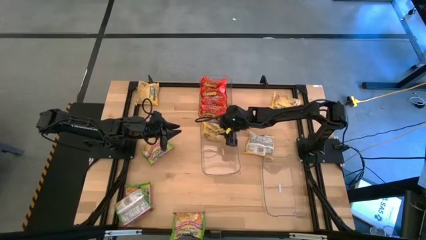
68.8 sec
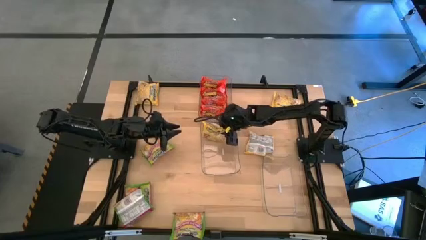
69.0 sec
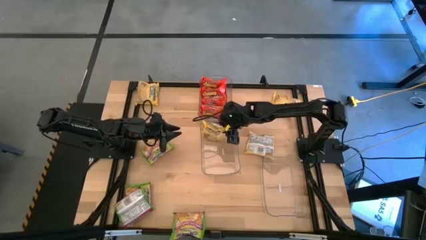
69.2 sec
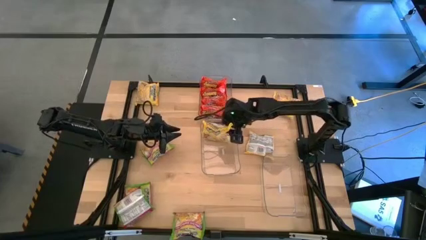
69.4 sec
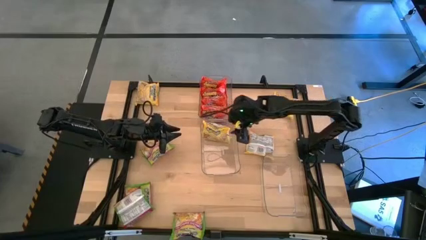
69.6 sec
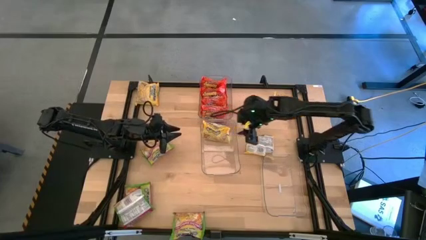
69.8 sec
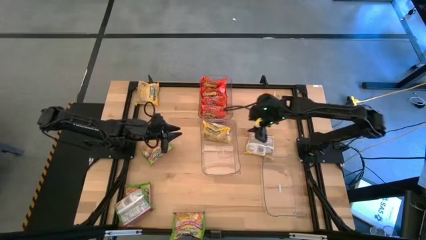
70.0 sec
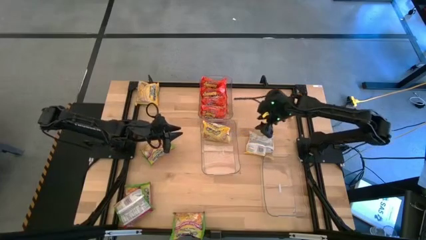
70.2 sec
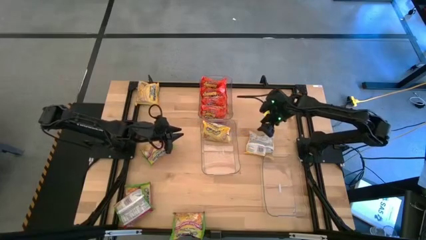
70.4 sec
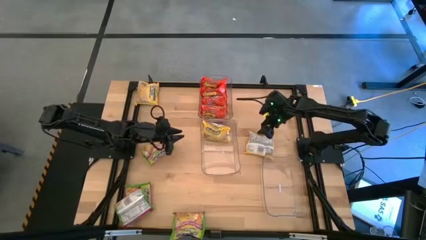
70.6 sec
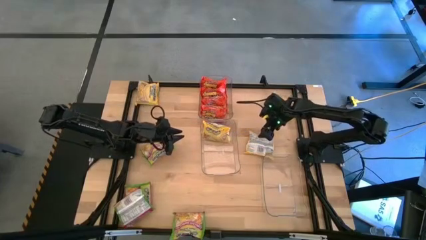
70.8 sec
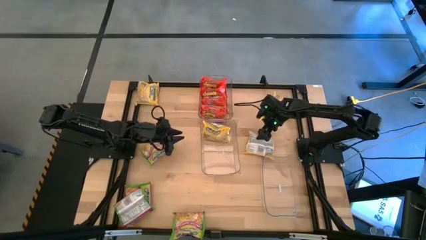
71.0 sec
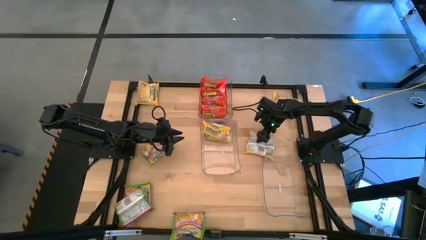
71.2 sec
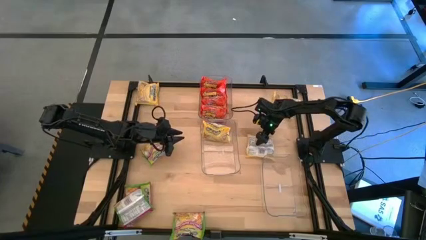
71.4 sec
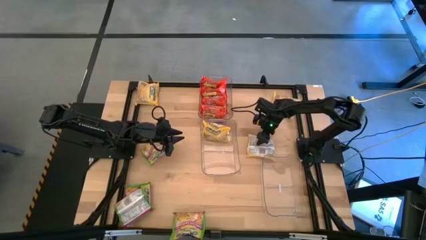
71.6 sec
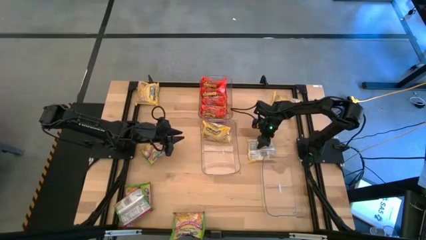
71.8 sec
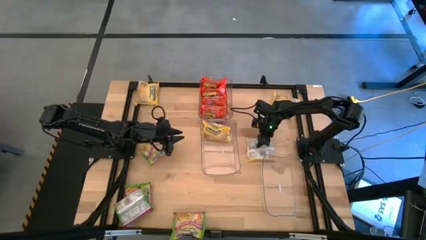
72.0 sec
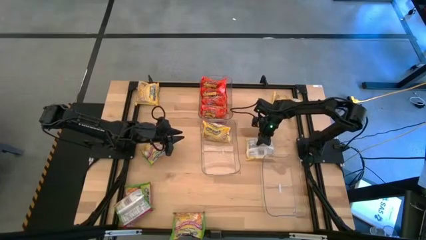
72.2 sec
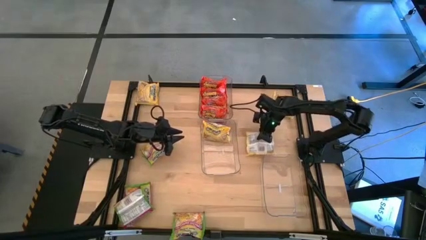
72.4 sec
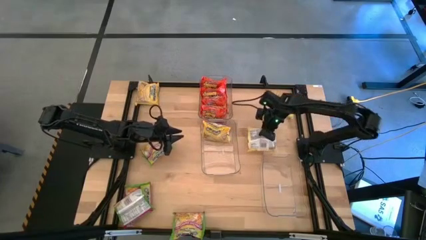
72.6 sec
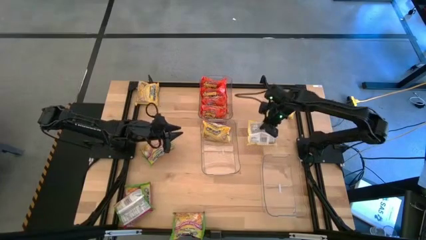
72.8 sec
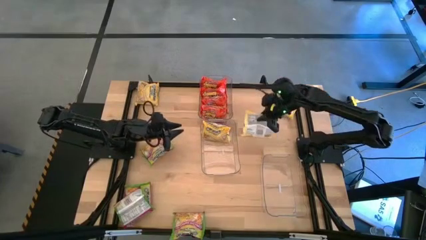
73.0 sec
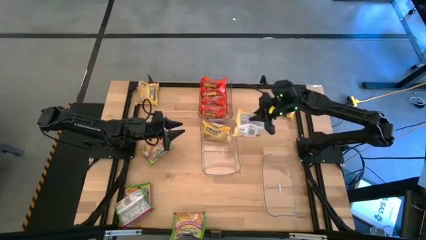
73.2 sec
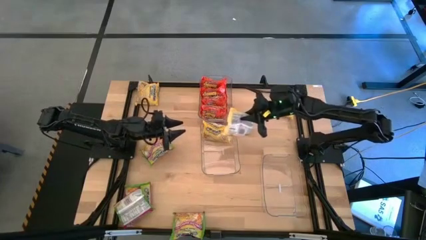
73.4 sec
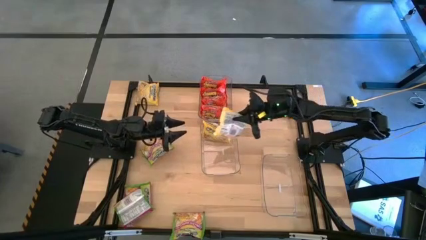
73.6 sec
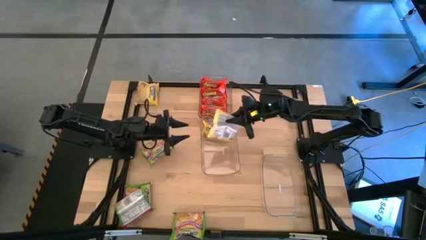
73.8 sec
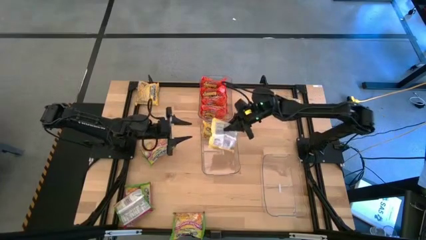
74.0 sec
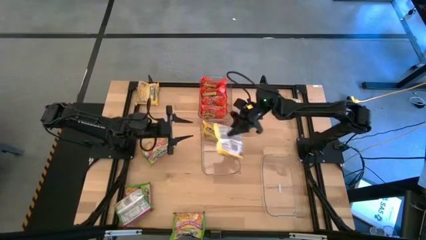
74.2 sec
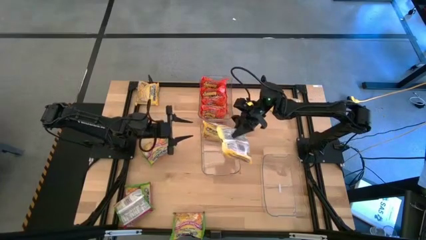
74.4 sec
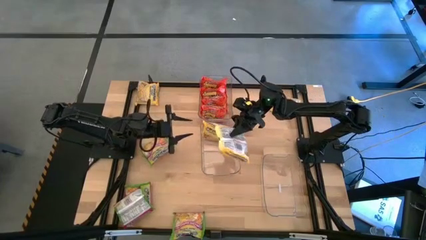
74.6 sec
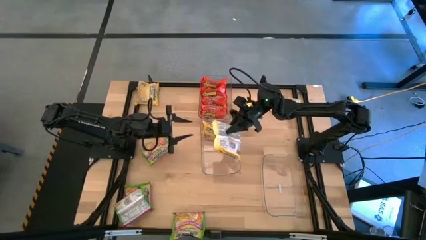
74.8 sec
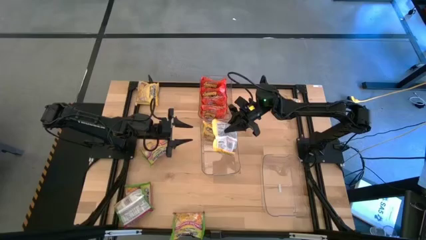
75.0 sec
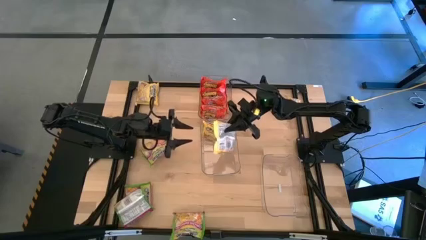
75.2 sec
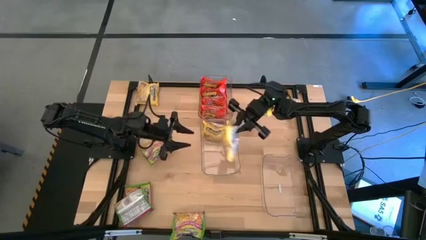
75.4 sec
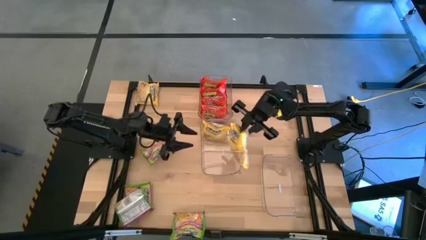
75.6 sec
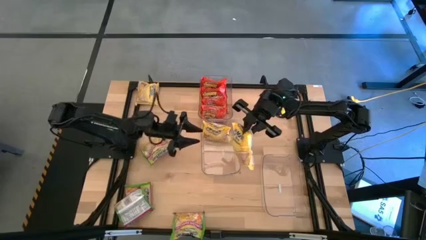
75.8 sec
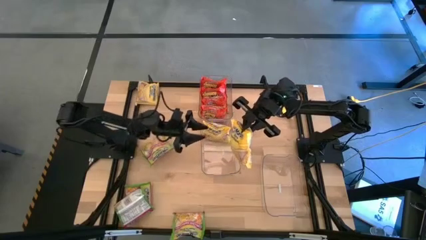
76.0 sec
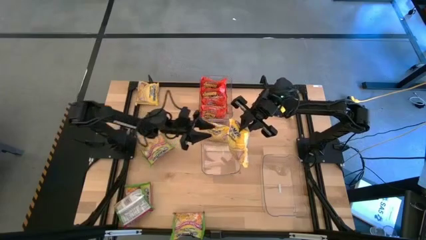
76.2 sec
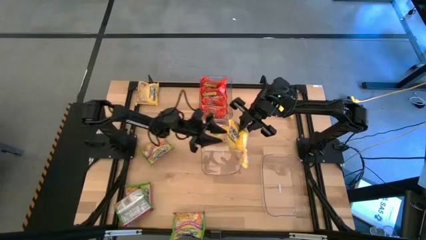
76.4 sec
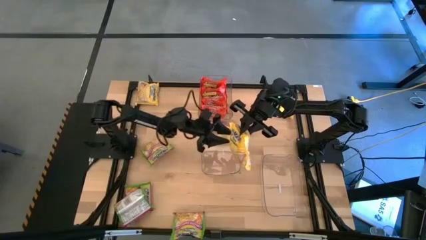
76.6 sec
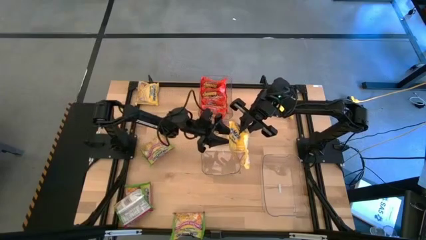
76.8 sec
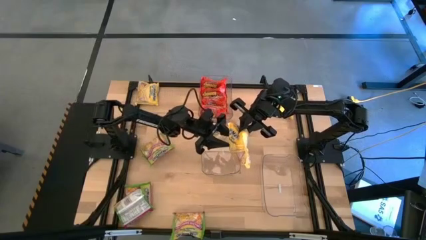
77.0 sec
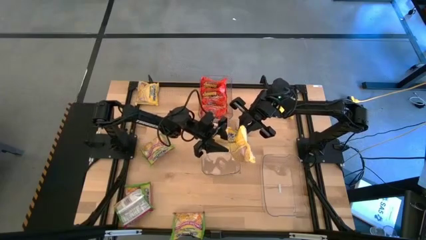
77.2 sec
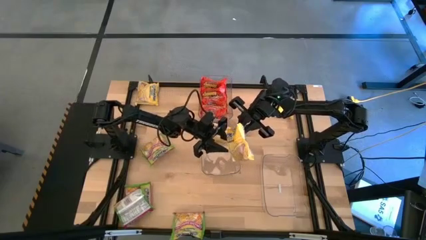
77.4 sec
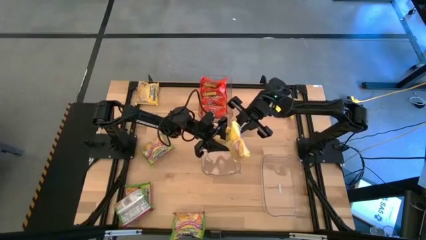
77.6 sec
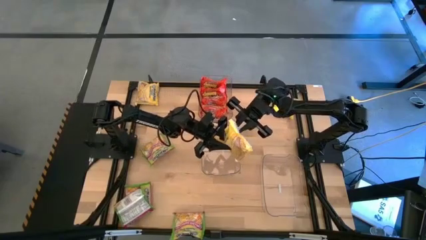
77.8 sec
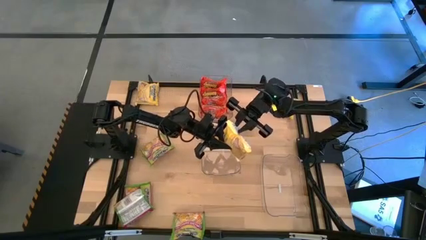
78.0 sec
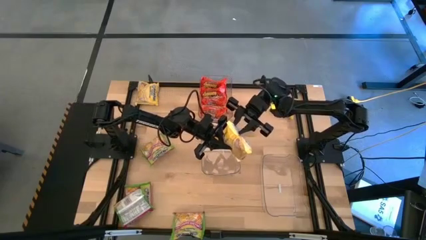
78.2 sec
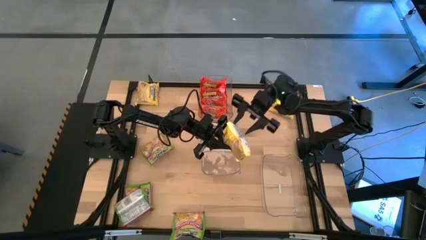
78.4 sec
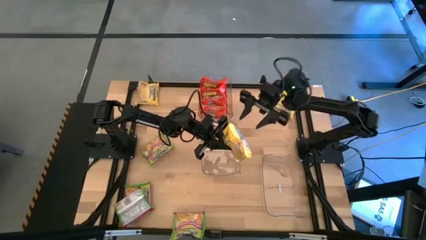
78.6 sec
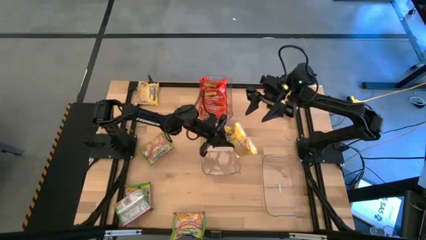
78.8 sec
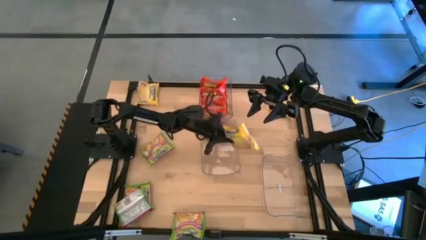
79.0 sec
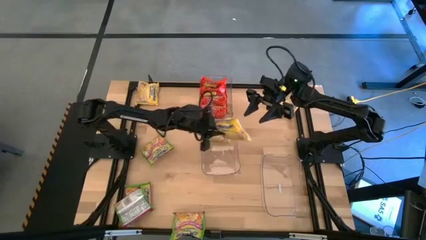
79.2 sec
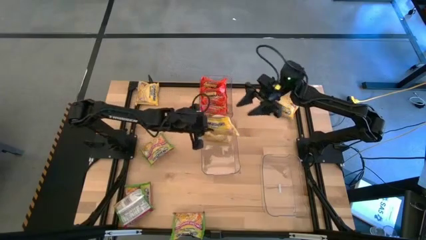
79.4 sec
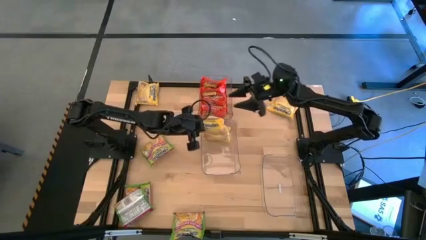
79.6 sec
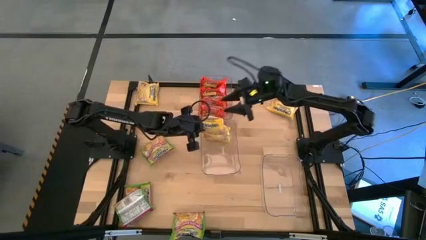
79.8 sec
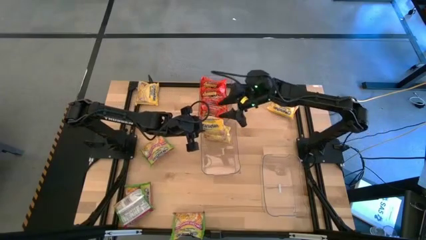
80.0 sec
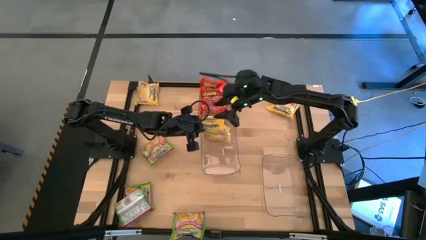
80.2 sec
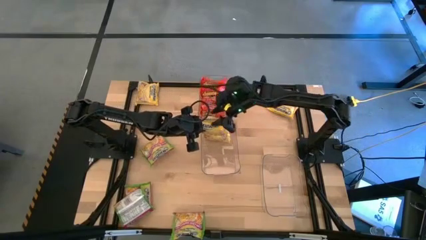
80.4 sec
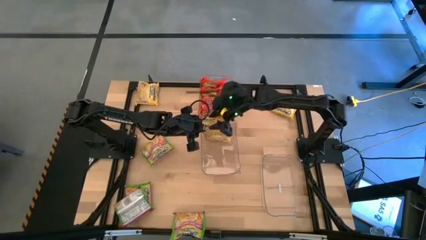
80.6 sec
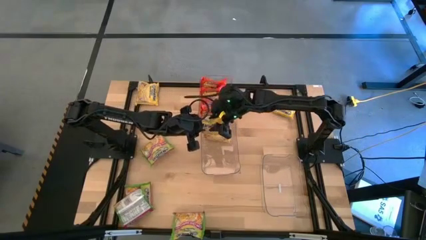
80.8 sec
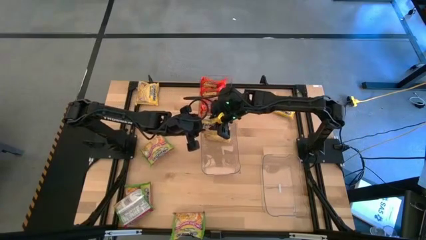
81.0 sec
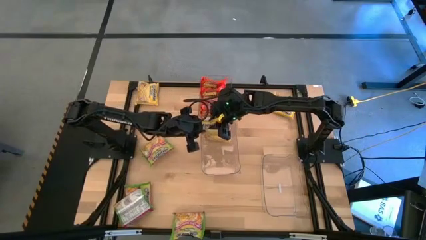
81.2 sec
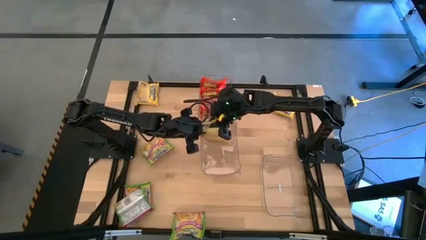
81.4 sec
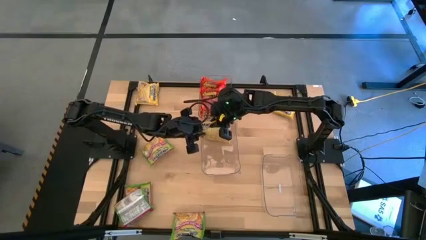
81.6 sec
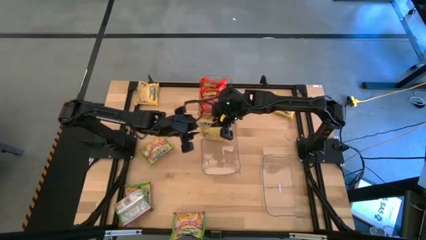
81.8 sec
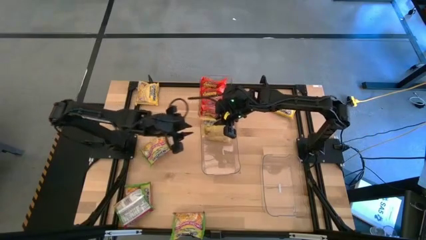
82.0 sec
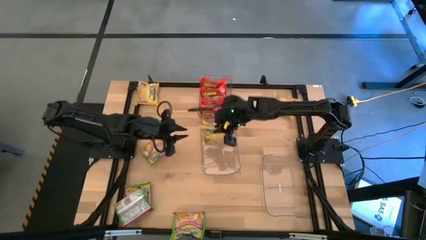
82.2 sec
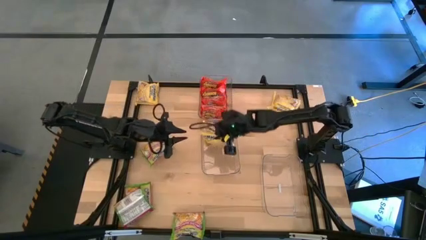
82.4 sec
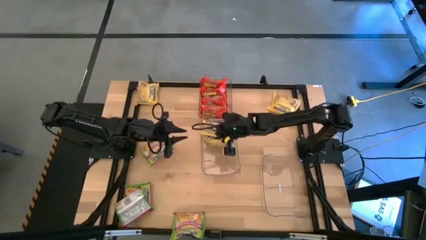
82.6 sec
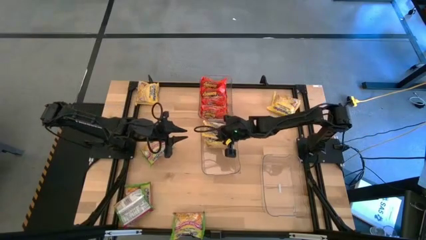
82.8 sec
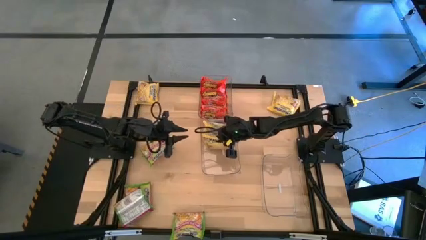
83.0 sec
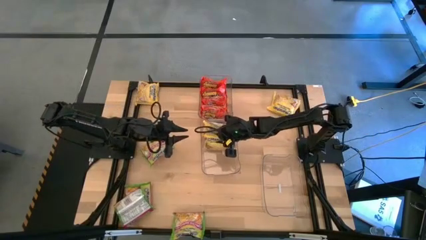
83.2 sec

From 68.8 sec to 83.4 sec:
Task: Sort Maruchan noodles
Put the yellow noodle pack into the middle transparent bin
